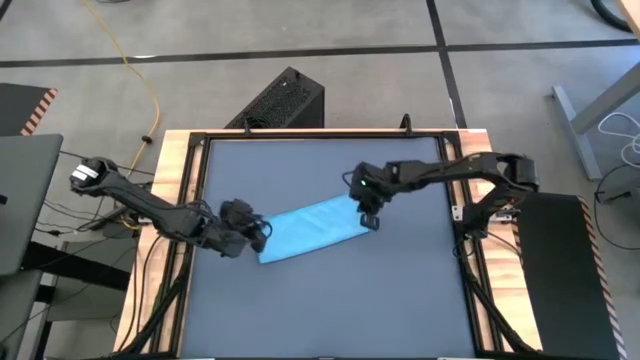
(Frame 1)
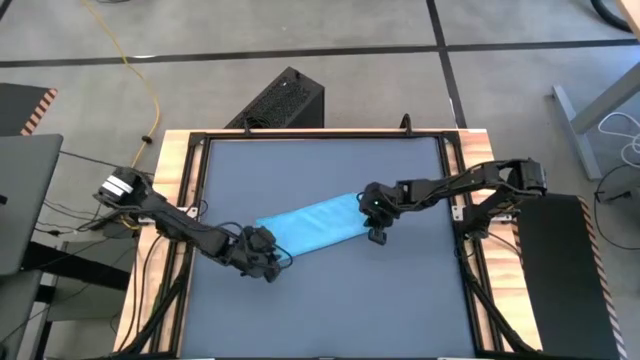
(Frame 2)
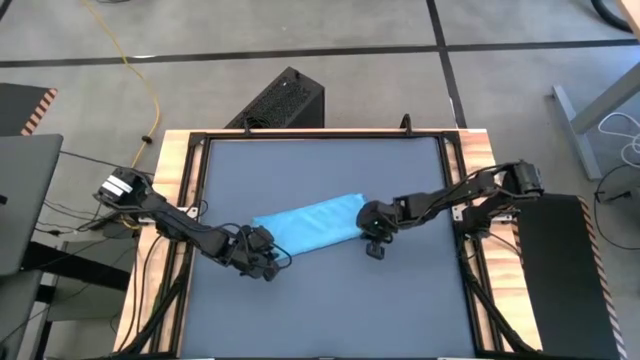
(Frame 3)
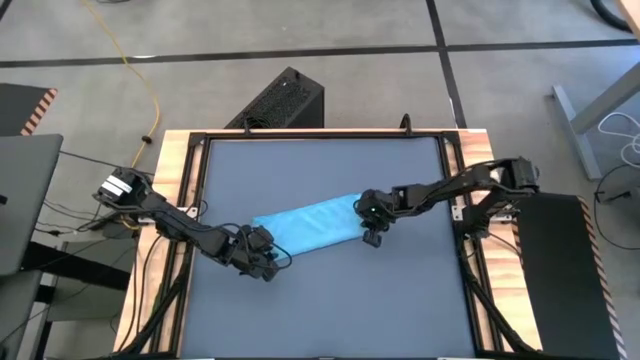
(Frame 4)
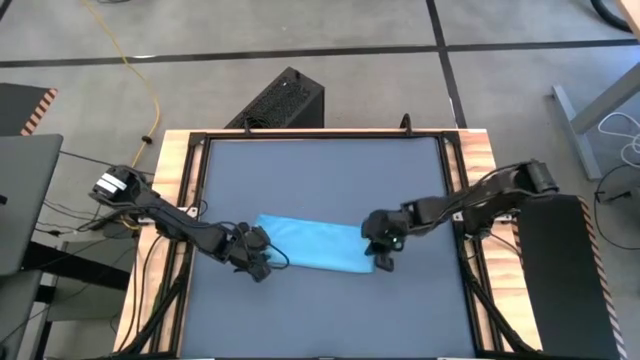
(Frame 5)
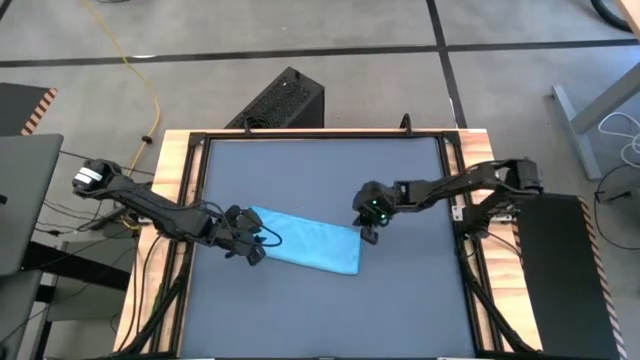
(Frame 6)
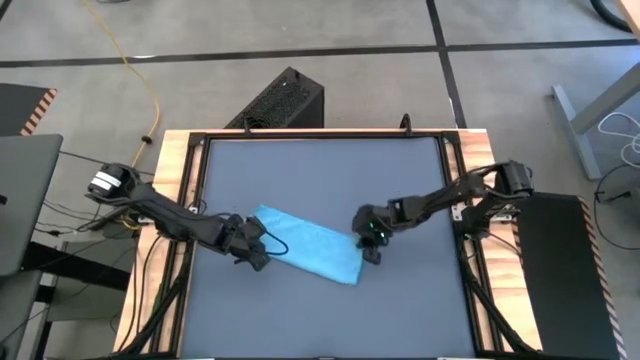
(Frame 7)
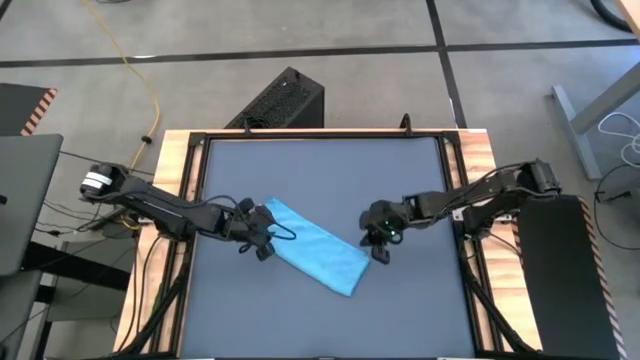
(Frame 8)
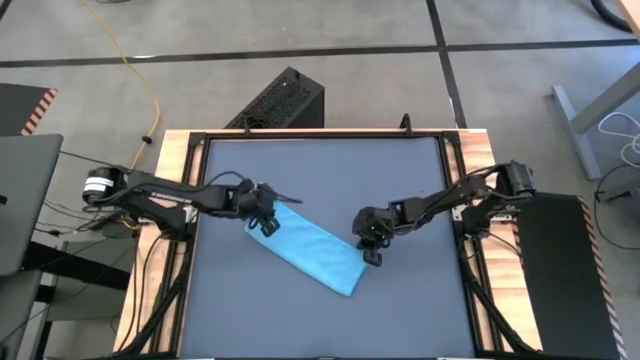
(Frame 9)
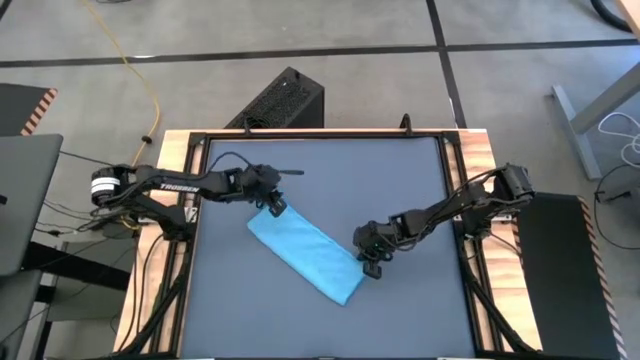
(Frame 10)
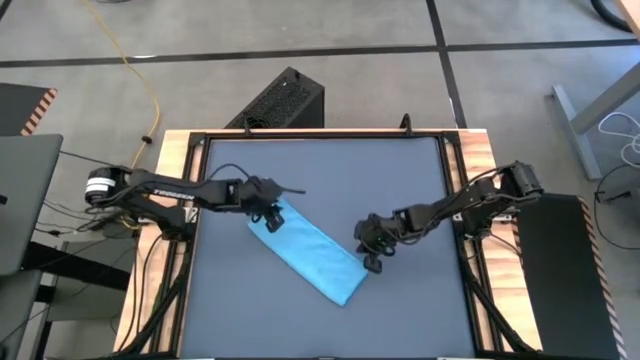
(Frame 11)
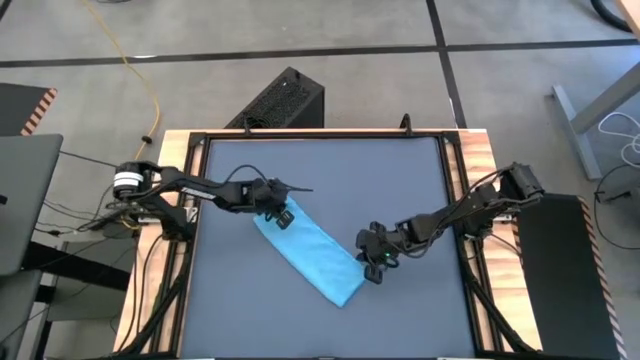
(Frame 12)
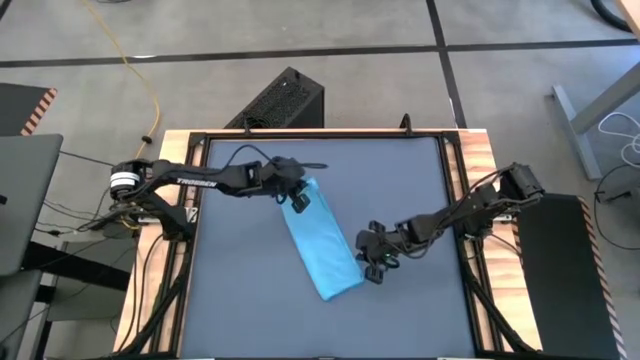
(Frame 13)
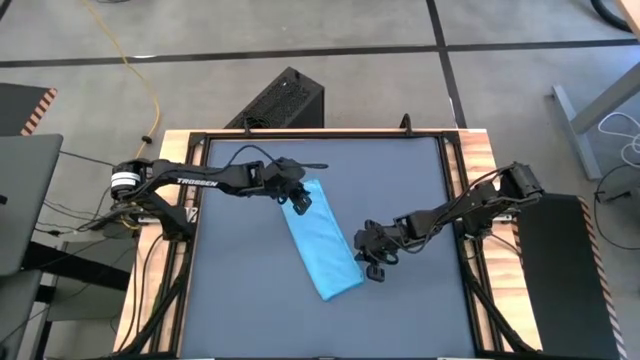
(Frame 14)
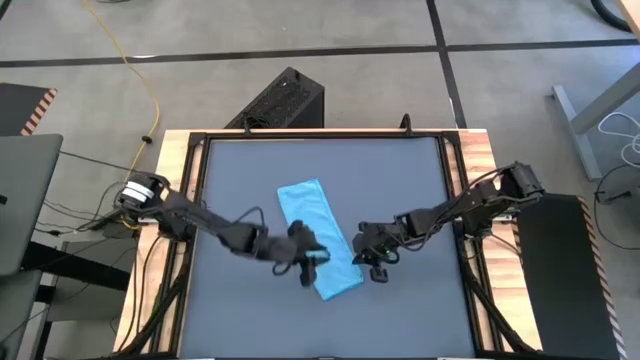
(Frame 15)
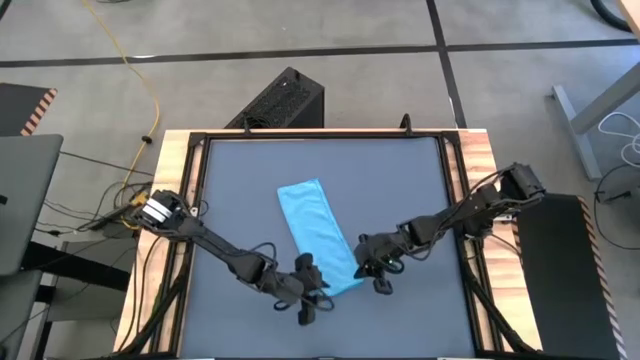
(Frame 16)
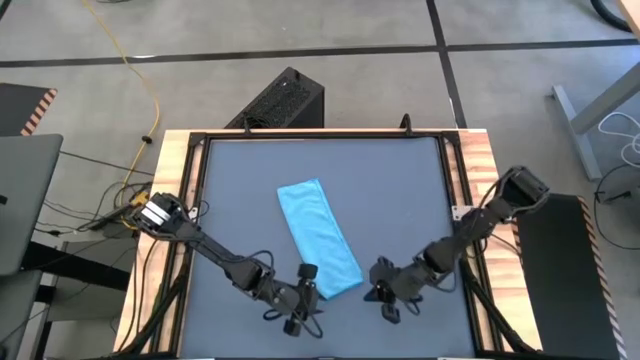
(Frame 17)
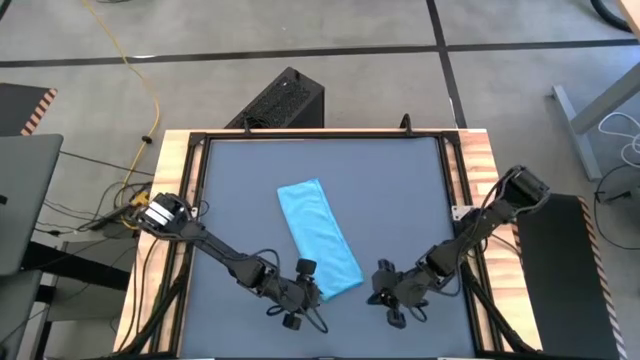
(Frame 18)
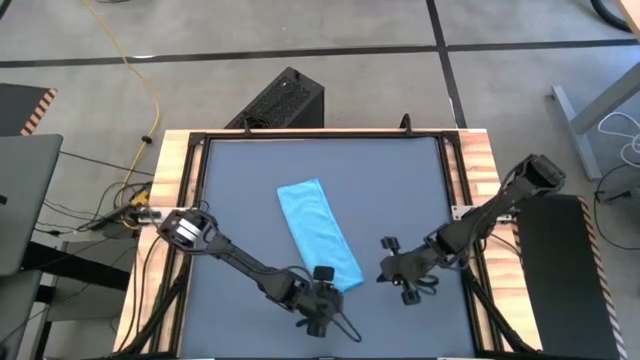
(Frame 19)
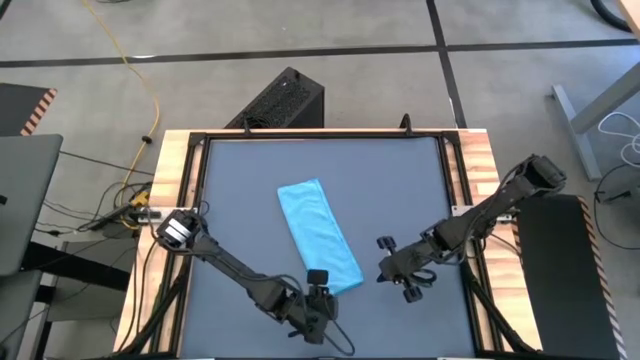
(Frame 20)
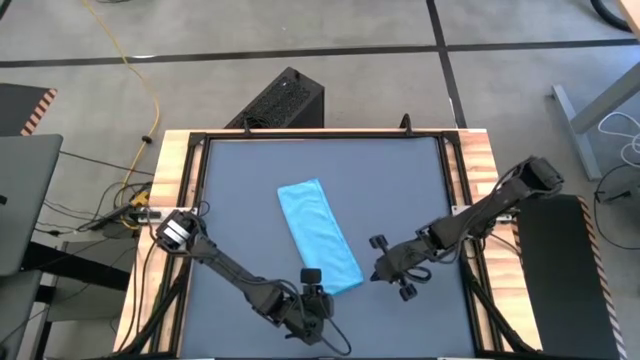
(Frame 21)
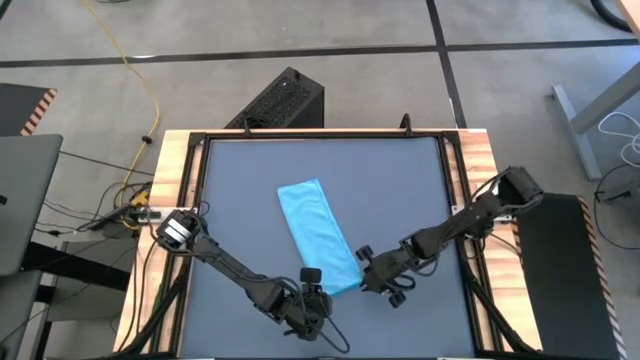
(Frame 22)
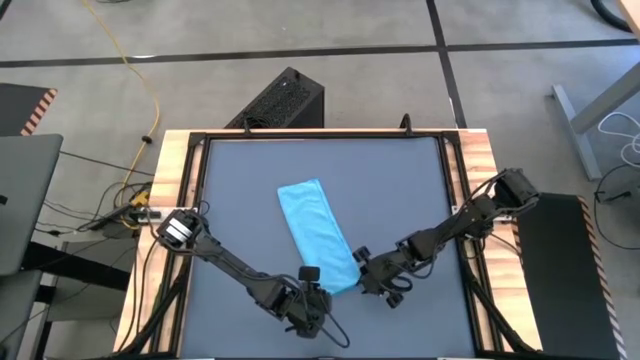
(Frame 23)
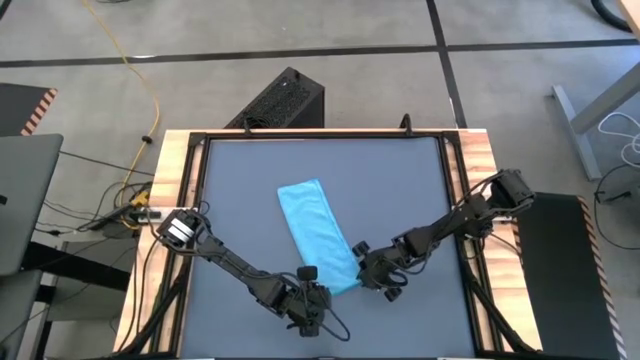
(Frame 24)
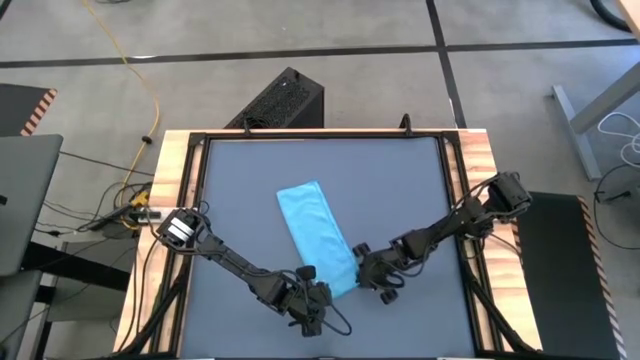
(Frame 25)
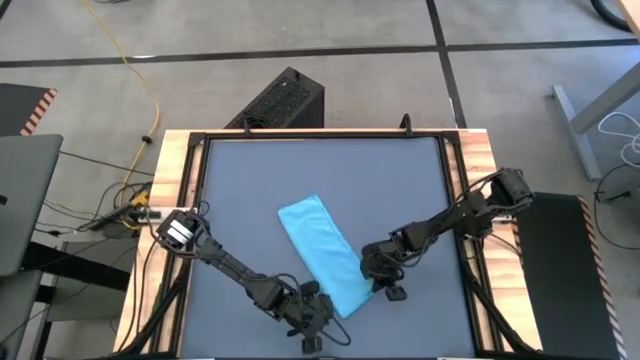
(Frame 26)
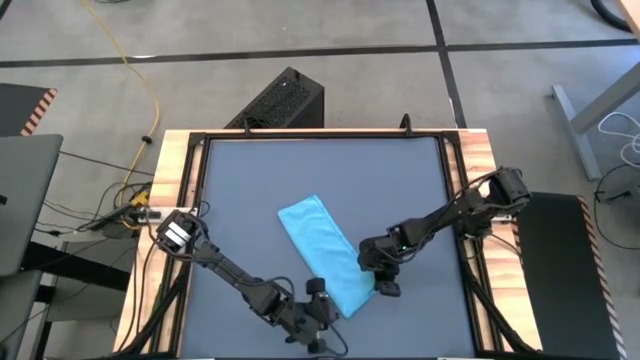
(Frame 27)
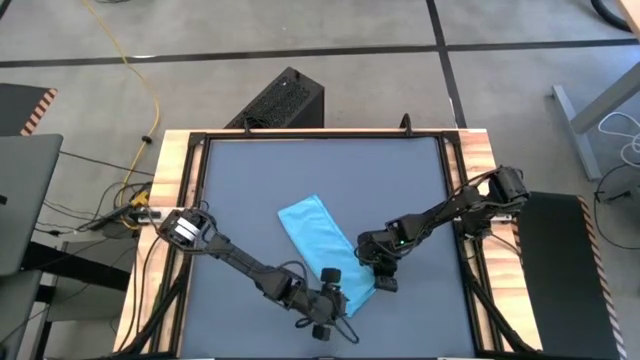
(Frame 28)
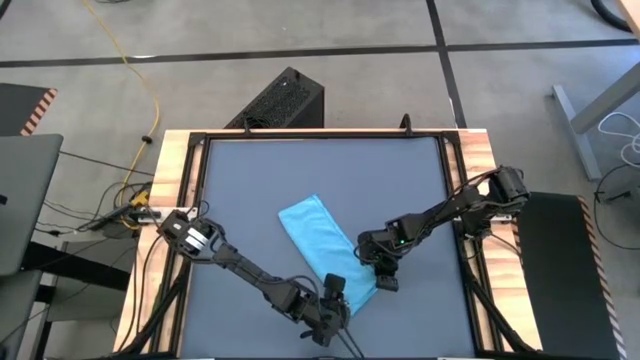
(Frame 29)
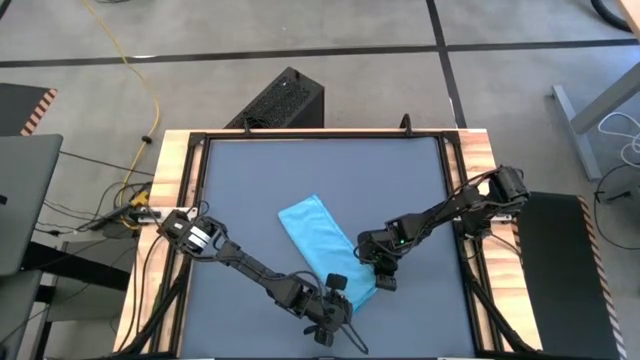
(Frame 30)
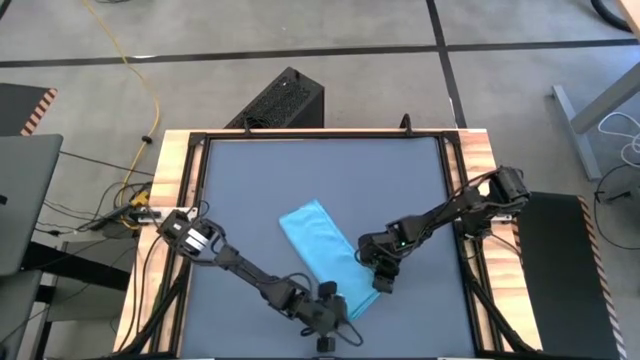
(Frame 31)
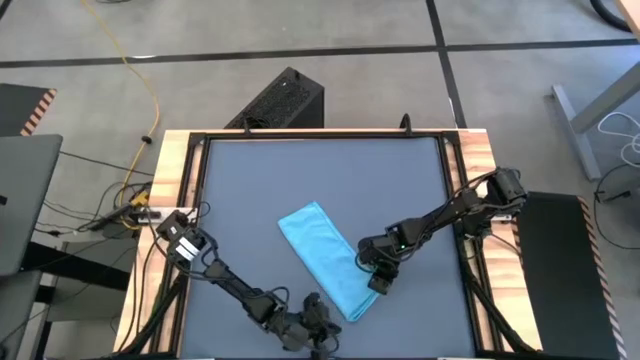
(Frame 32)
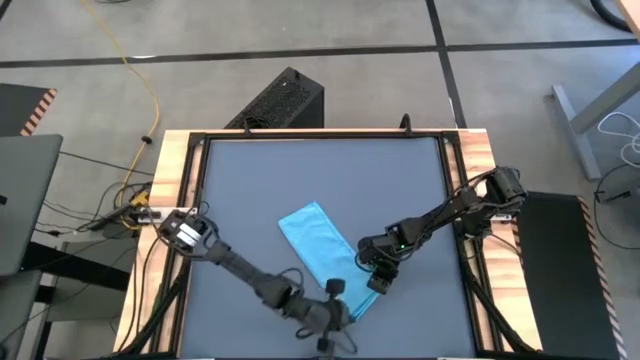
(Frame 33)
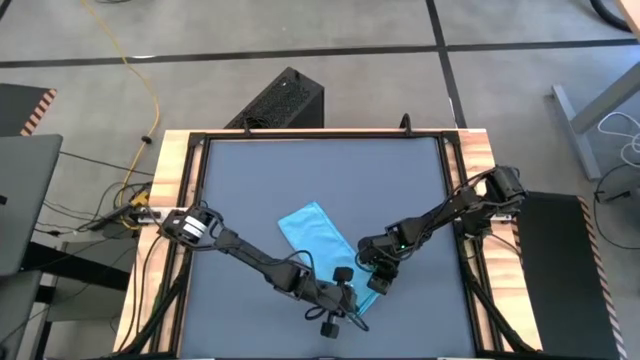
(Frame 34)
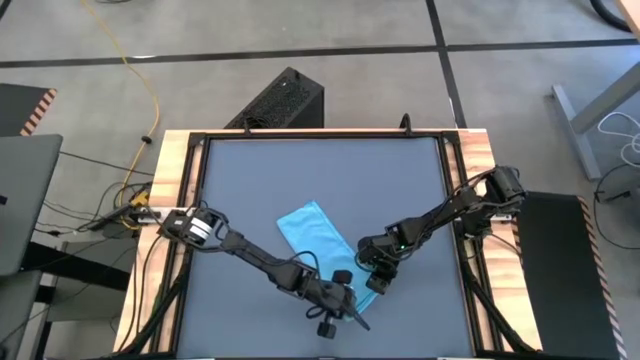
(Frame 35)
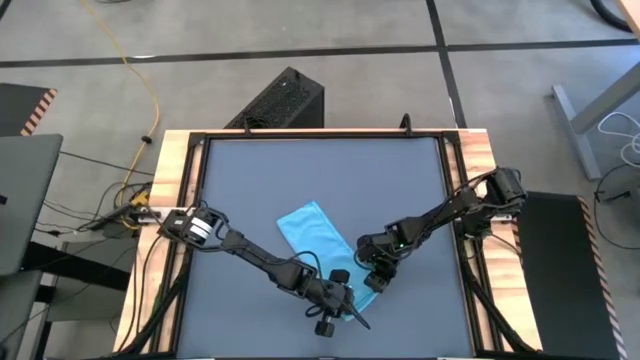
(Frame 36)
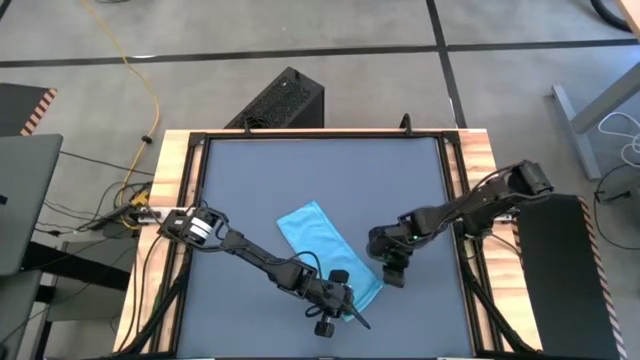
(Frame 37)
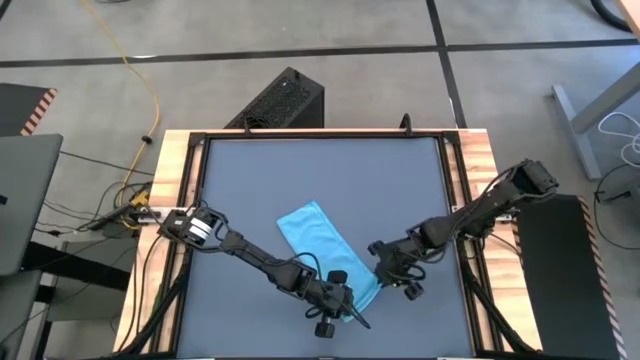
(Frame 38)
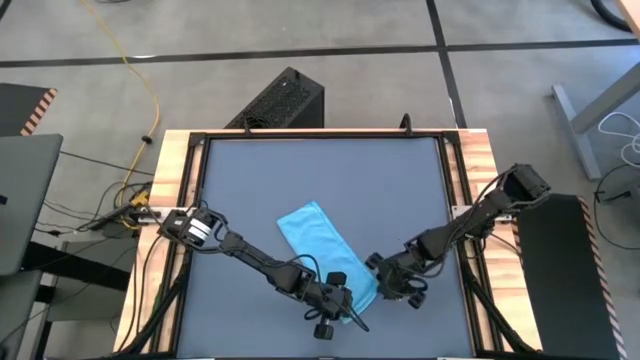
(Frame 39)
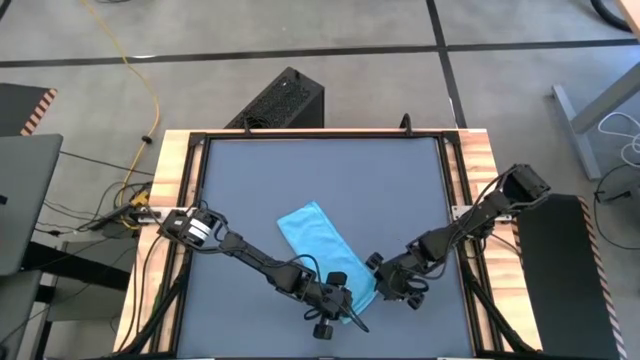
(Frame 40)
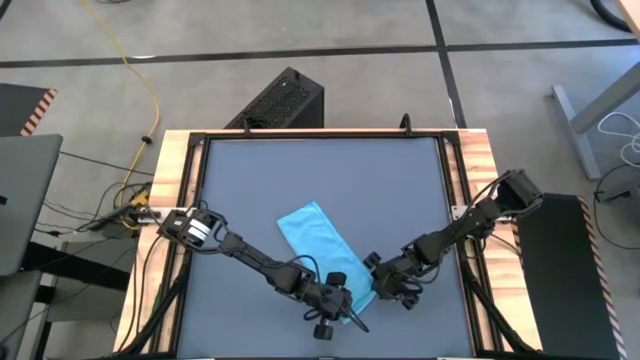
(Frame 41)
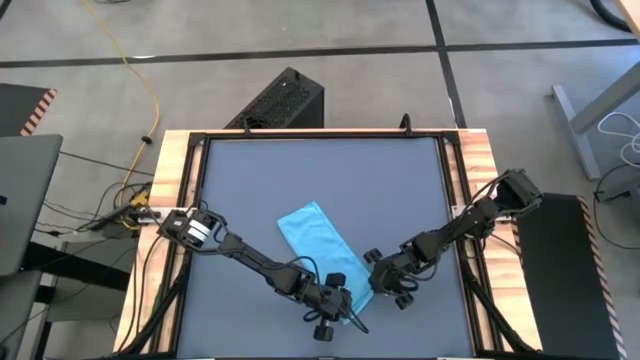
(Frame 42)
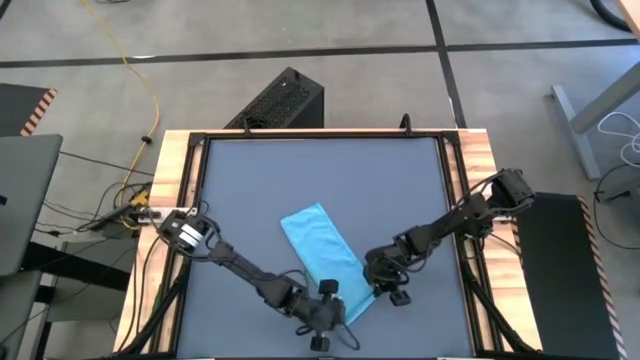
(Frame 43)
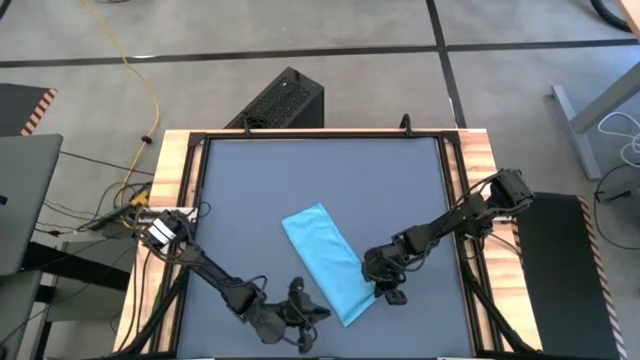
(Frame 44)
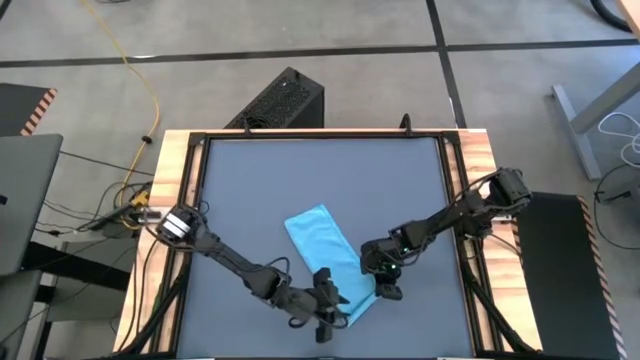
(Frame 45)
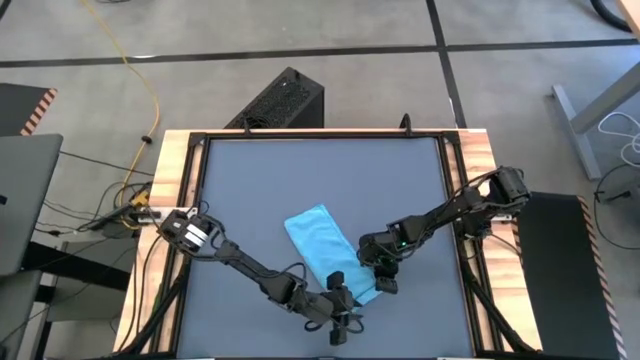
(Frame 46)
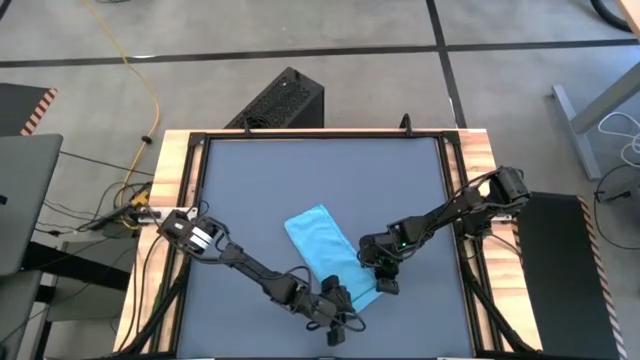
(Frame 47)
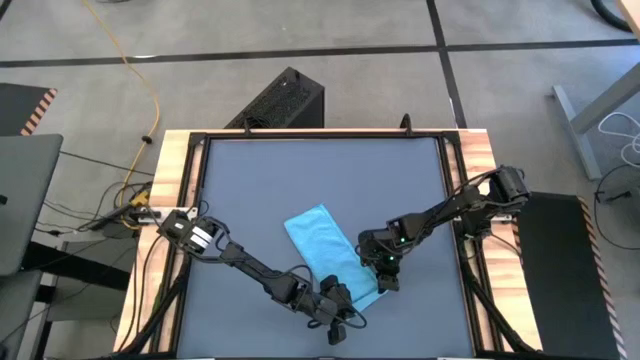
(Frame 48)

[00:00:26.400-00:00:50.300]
Task: Roll towel into tight, uniform cylinder
Roll the blue microfiber cloth
